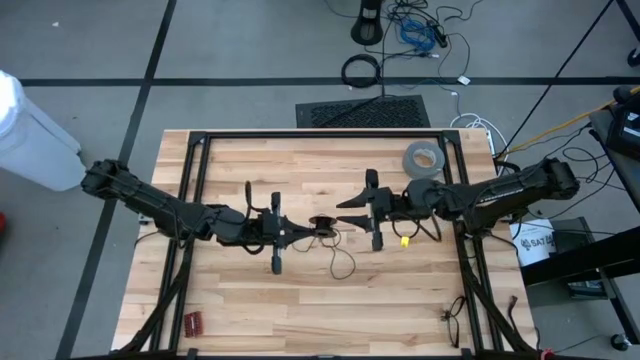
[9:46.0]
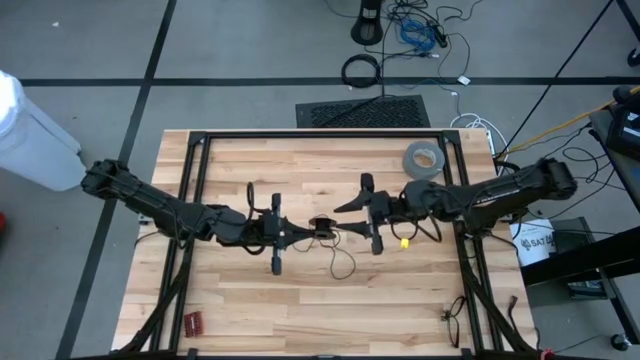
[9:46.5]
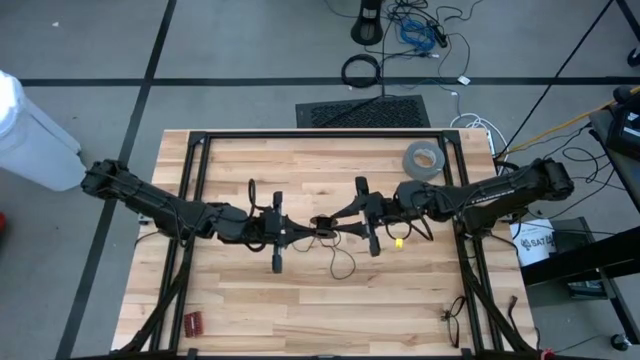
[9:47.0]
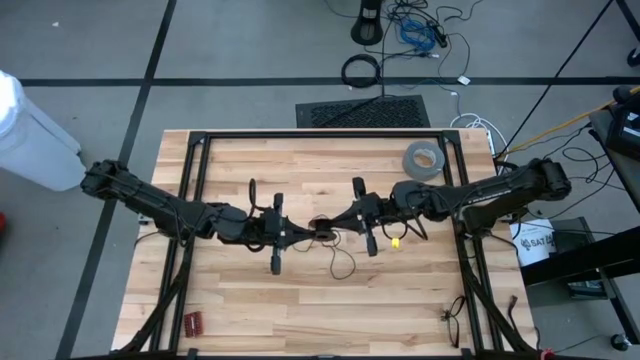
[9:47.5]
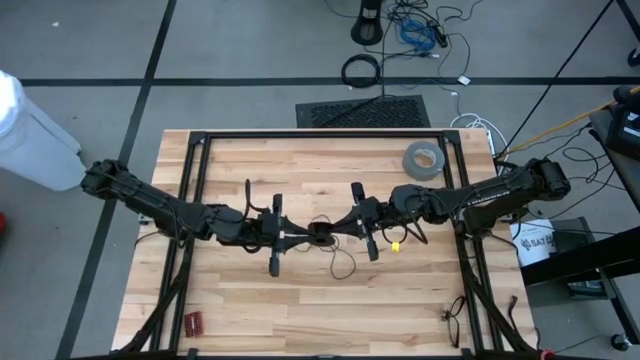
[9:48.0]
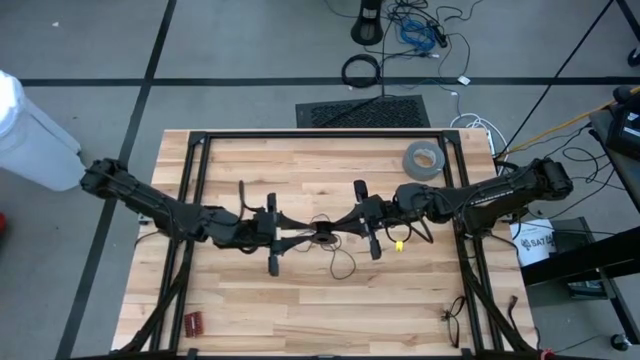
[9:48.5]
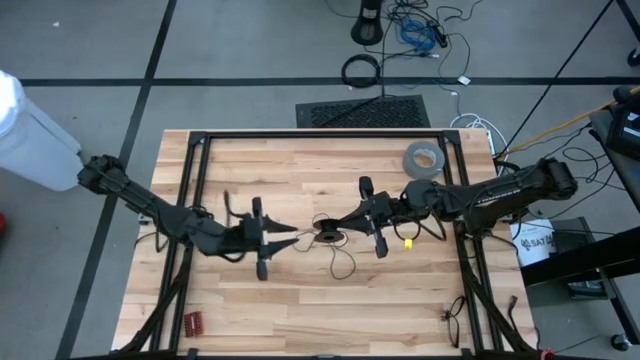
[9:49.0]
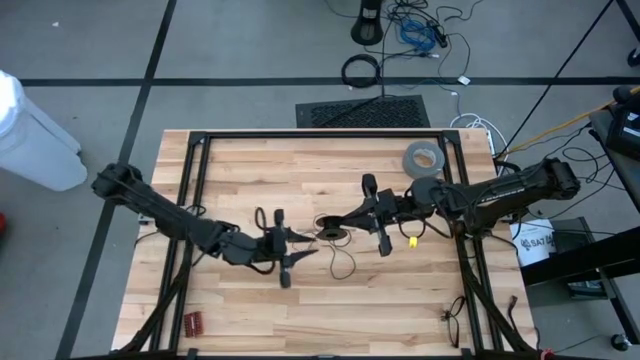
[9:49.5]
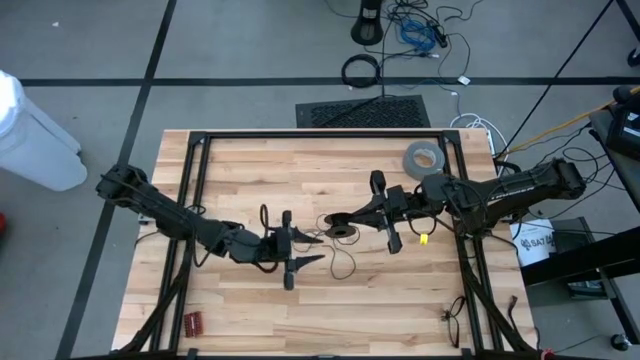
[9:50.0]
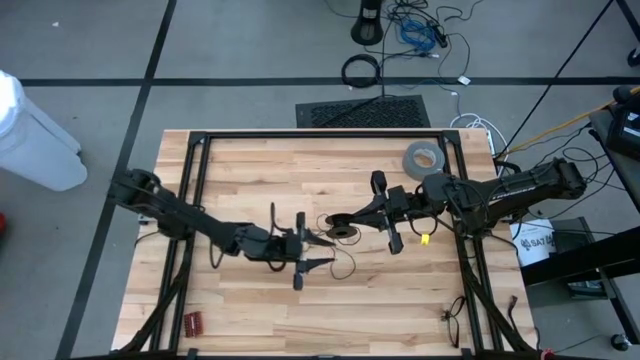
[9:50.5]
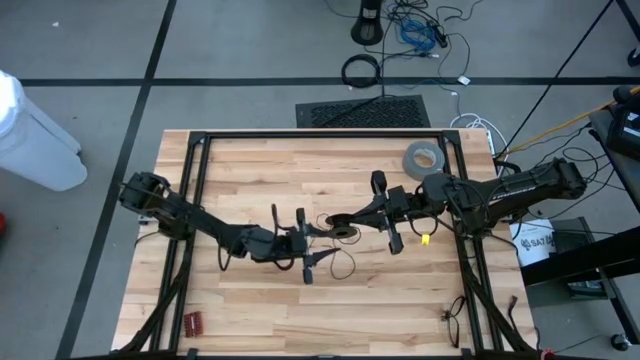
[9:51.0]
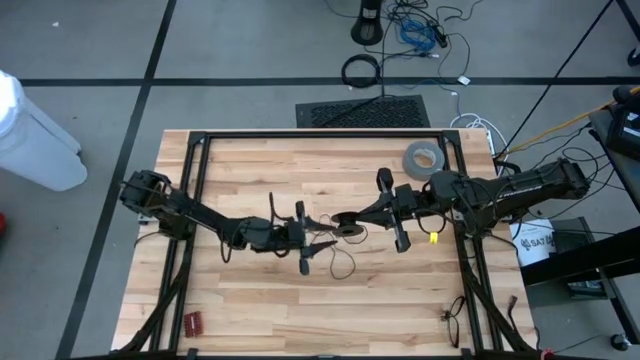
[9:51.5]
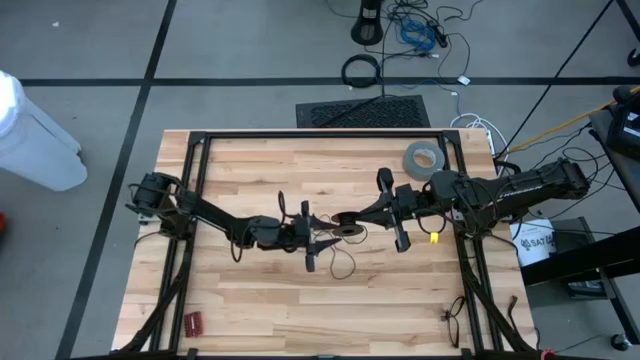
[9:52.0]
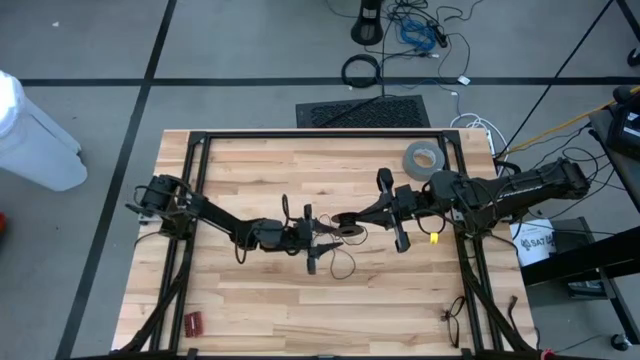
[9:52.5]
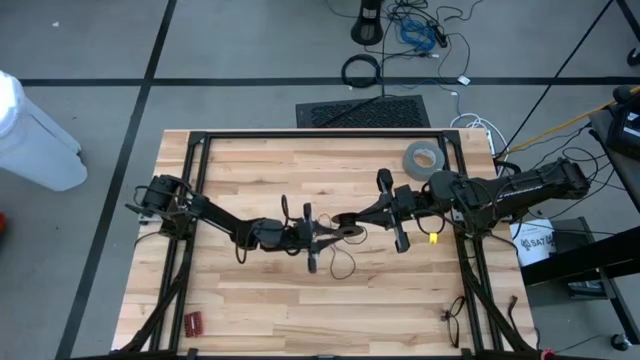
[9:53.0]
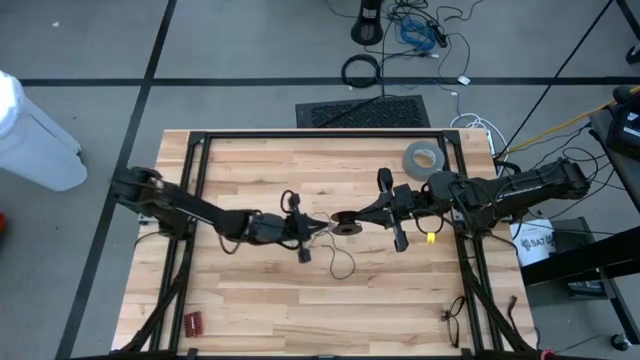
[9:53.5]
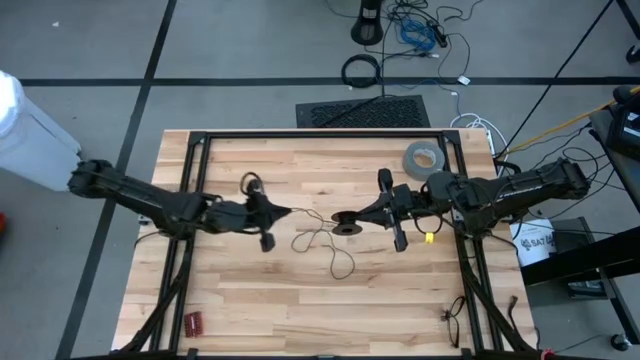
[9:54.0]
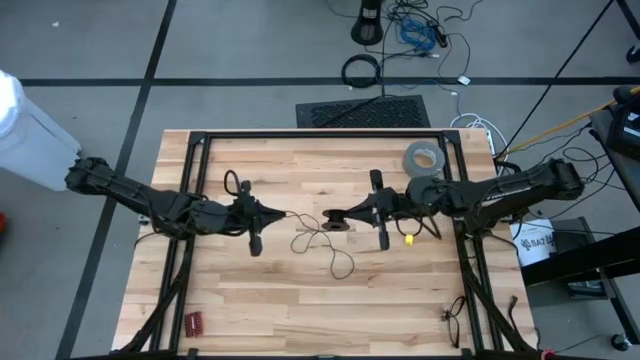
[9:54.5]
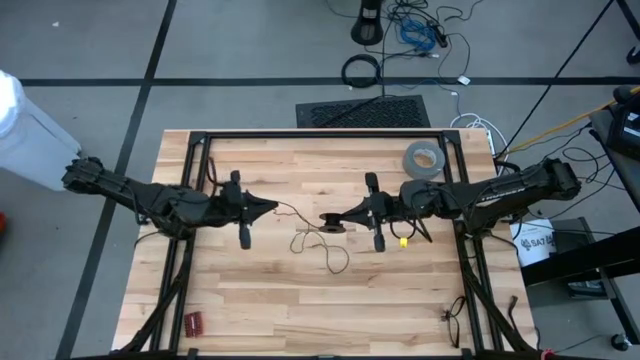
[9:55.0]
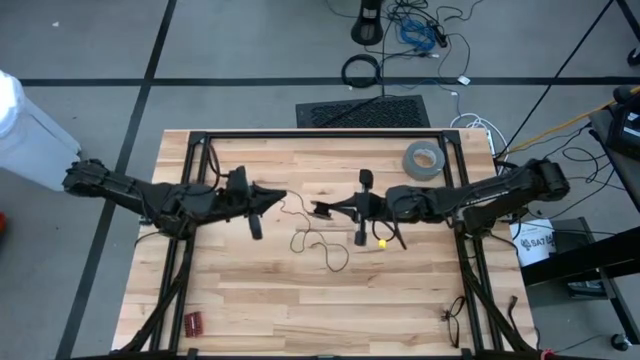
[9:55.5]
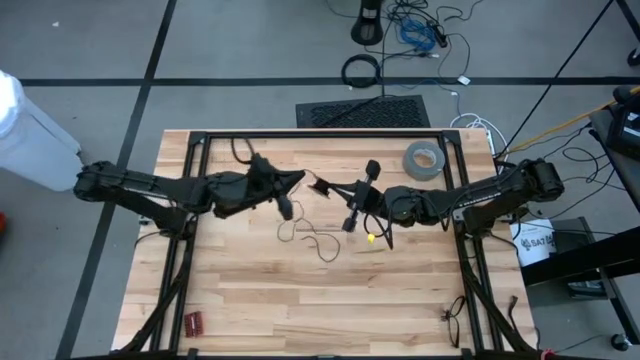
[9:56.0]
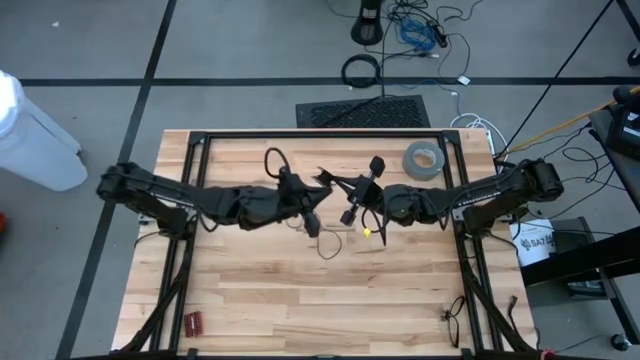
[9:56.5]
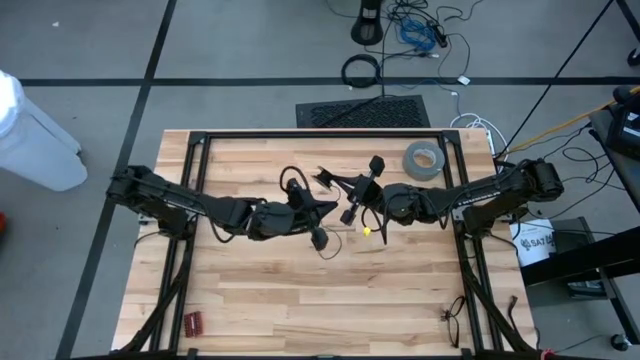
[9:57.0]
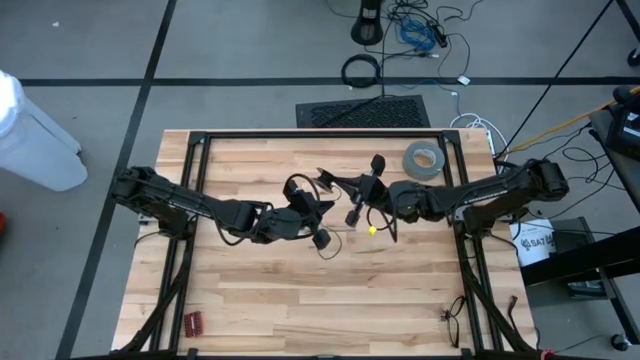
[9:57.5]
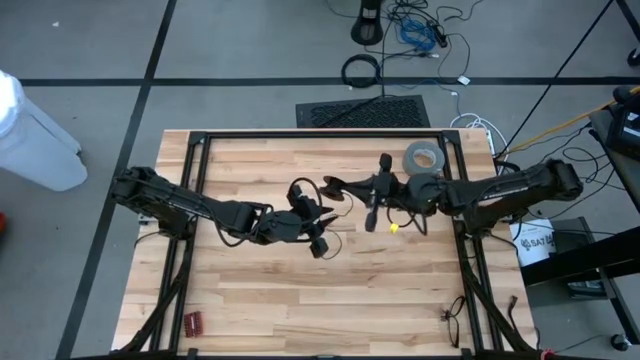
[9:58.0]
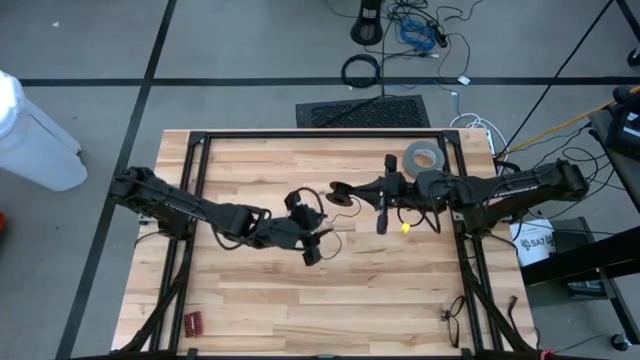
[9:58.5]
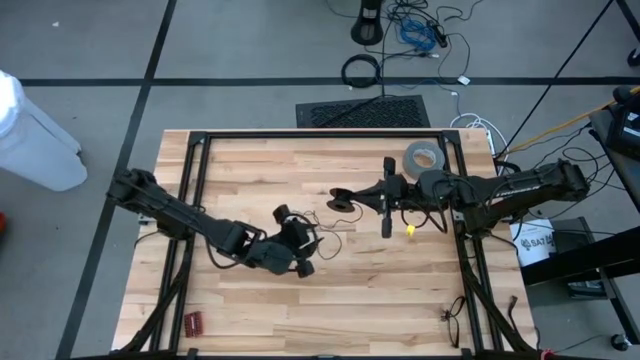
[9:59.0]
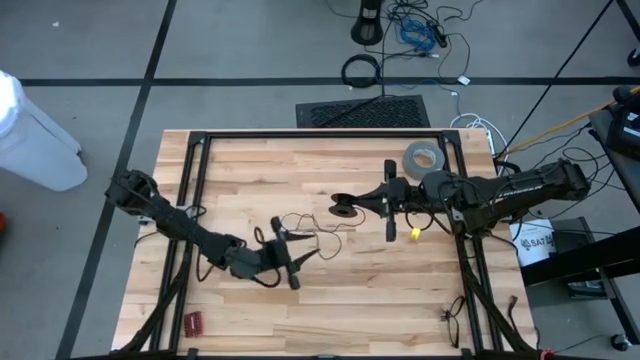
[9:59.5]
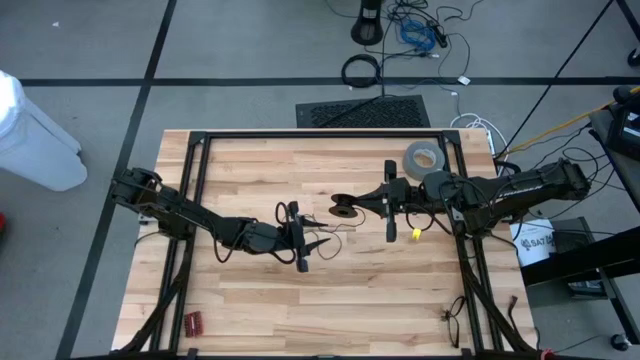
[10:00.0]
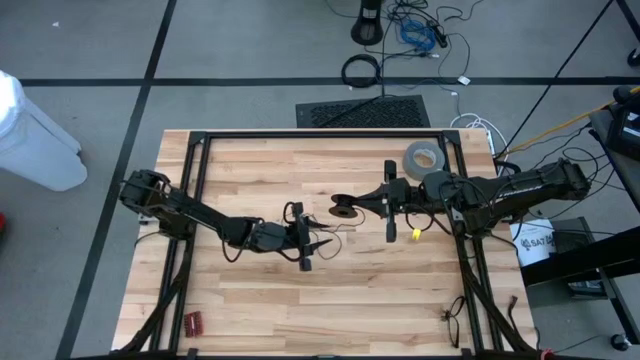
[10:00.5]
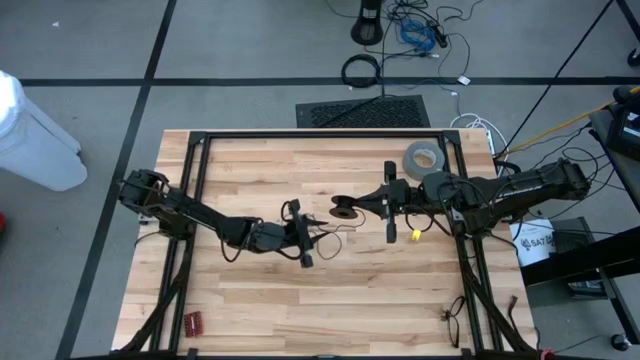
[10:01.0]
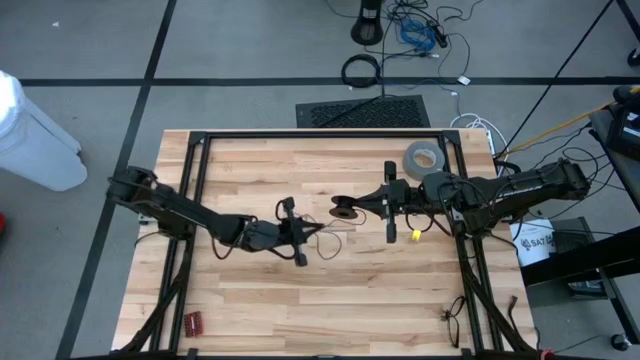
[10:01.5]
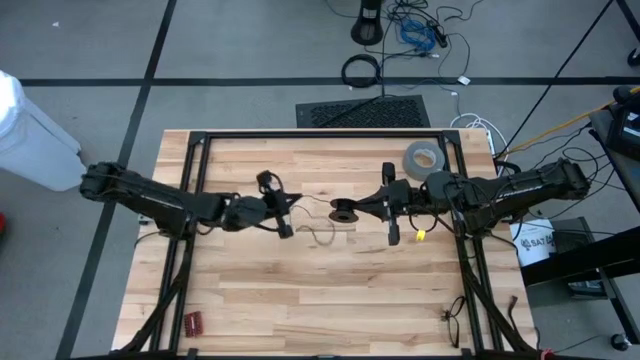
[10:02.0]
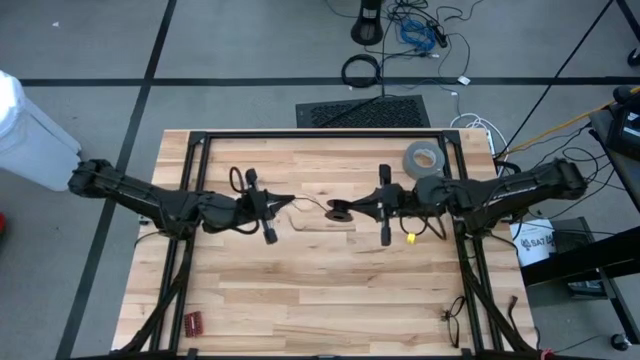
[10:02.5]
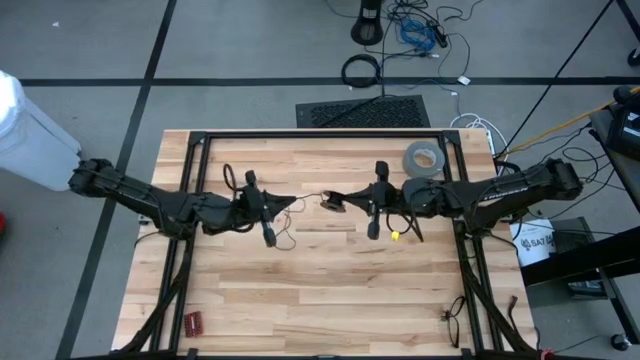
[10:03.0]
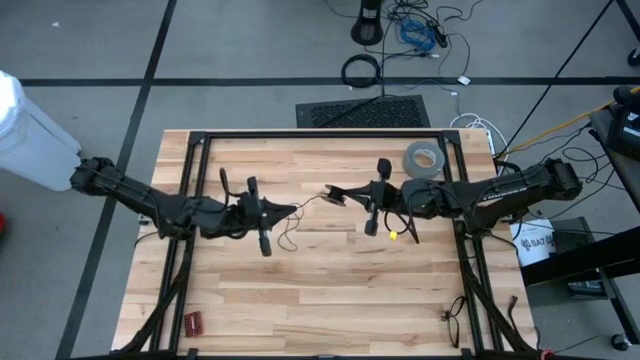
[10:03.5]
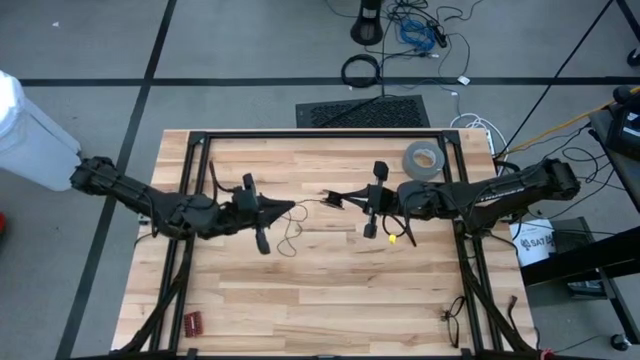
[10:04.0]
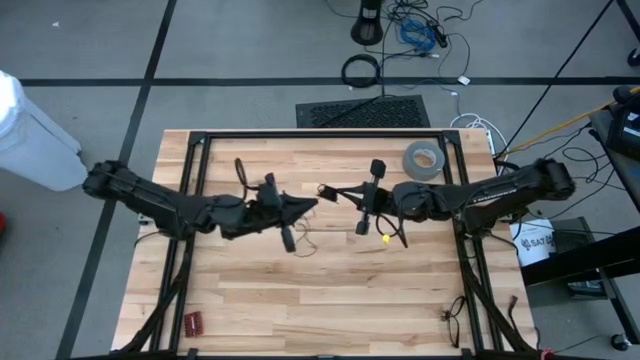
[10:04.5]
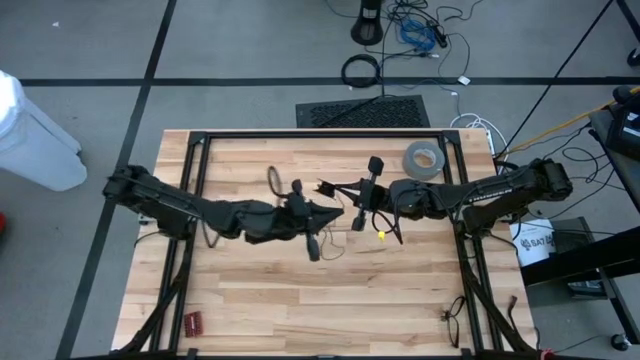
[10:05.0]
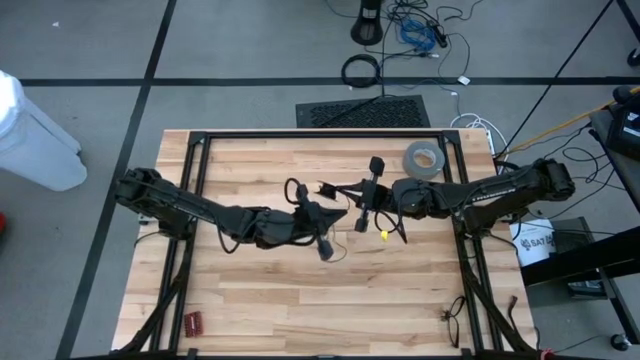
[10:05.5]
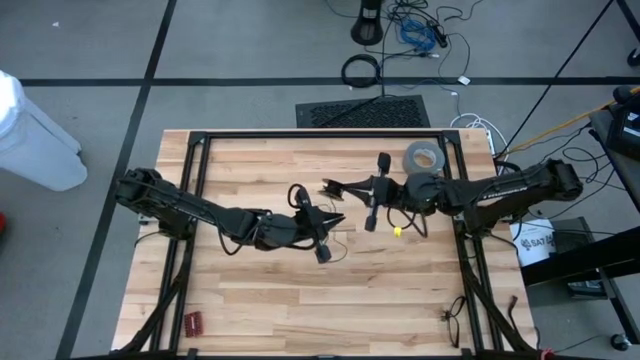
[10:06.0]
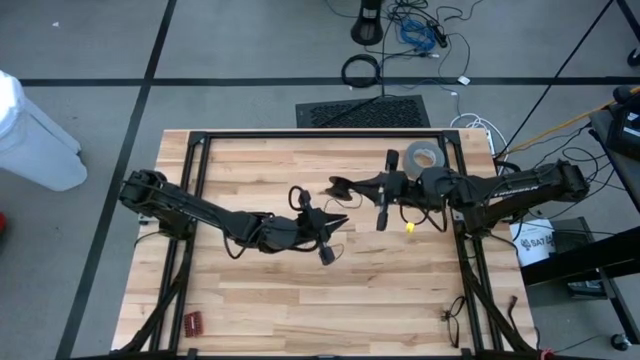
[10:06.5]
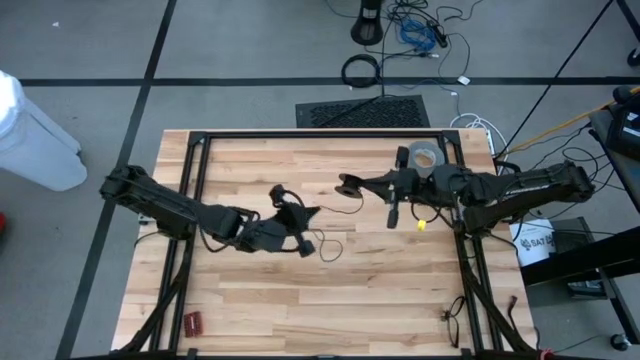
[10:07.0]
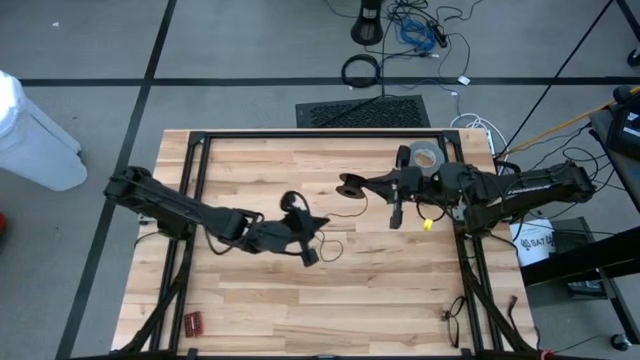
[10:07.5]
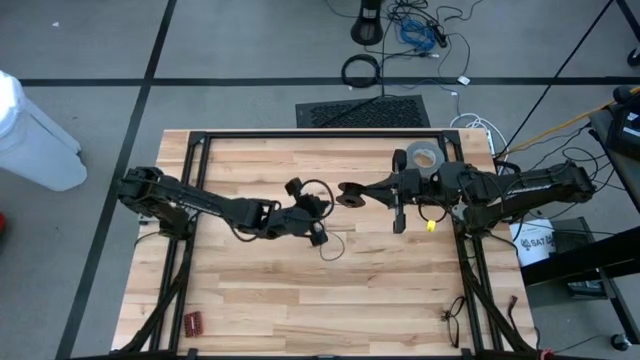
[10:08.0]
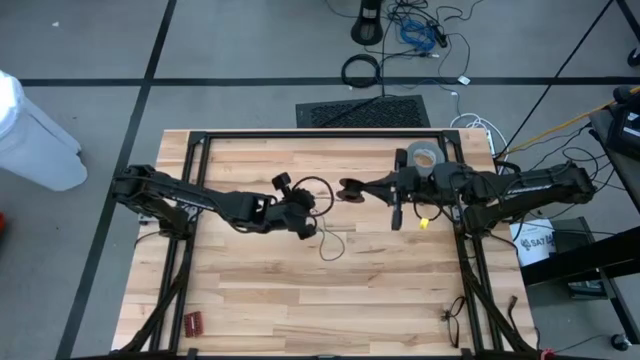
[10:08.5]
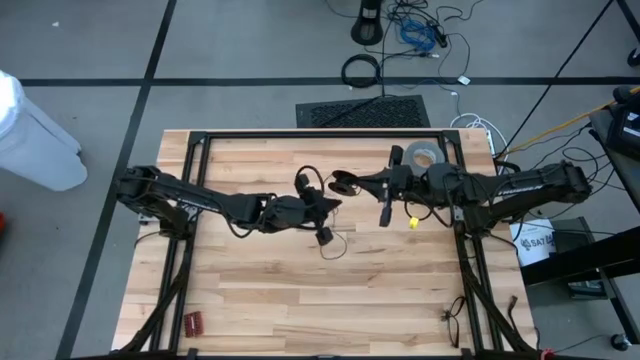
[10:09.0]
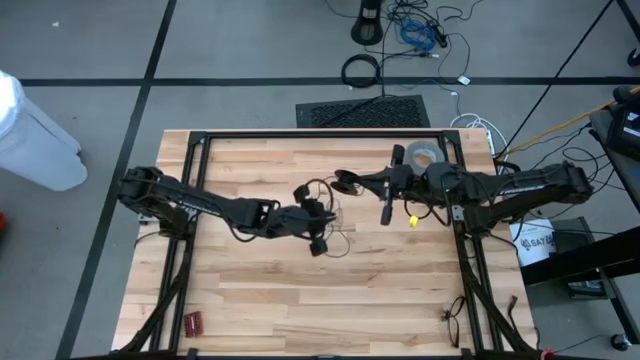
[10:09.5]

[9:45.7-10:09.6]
Task: Coil cords
Coil the black wire onto the spool
